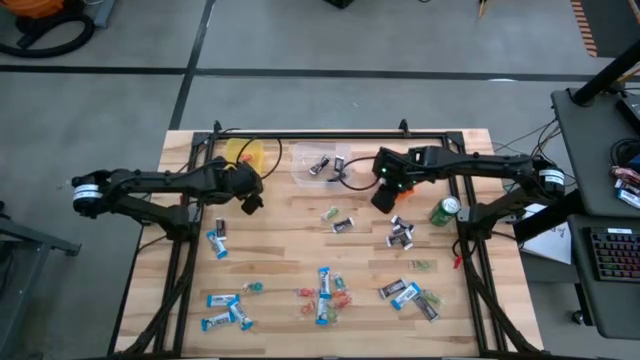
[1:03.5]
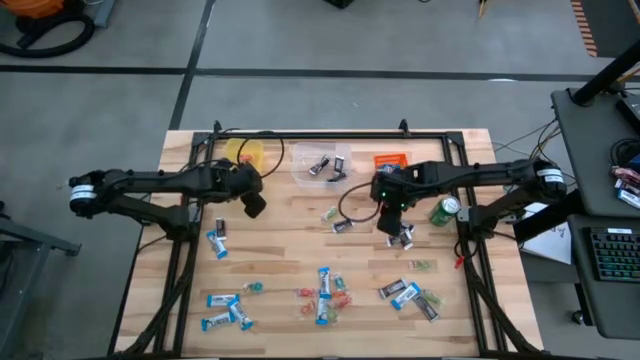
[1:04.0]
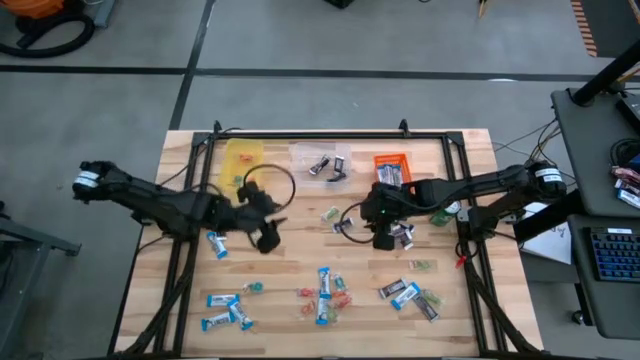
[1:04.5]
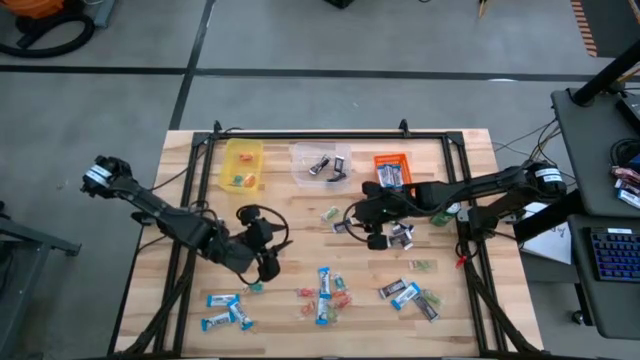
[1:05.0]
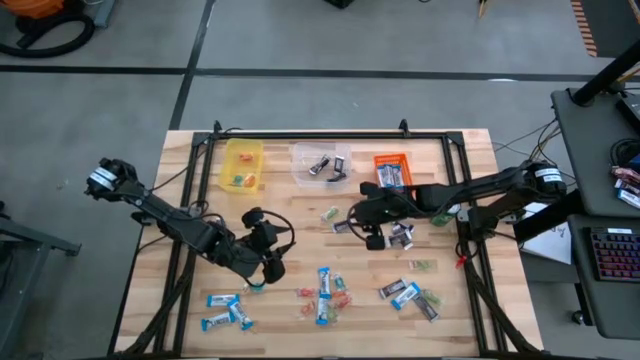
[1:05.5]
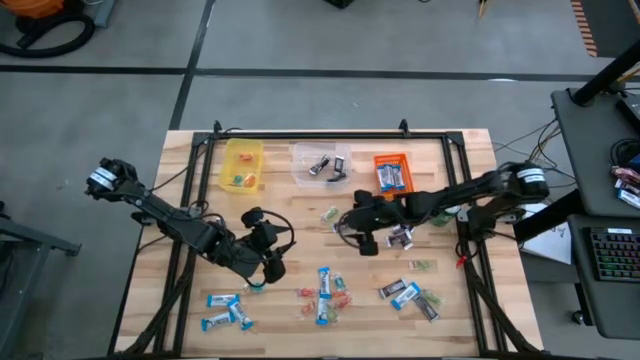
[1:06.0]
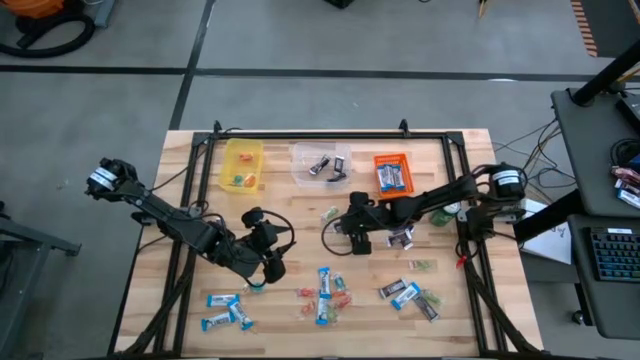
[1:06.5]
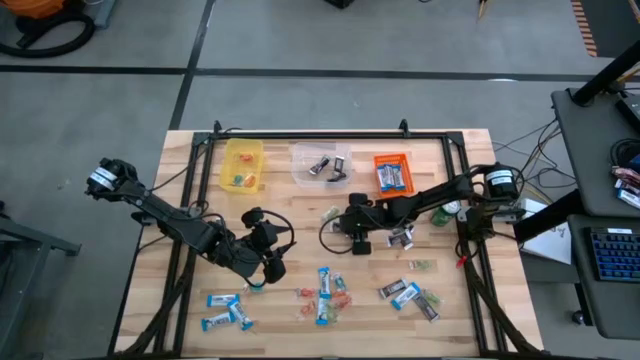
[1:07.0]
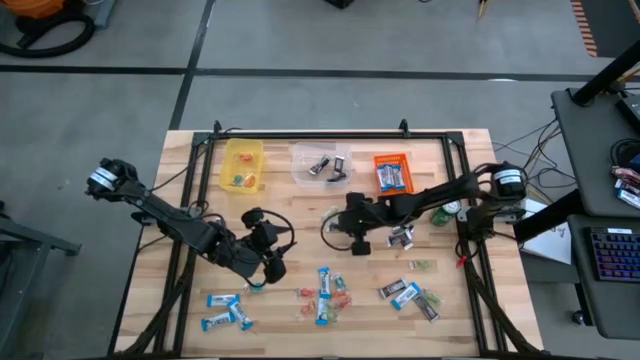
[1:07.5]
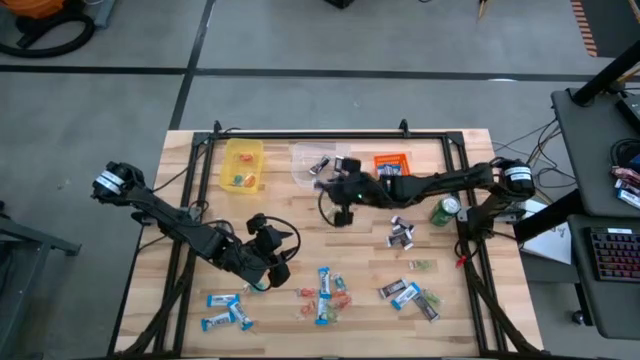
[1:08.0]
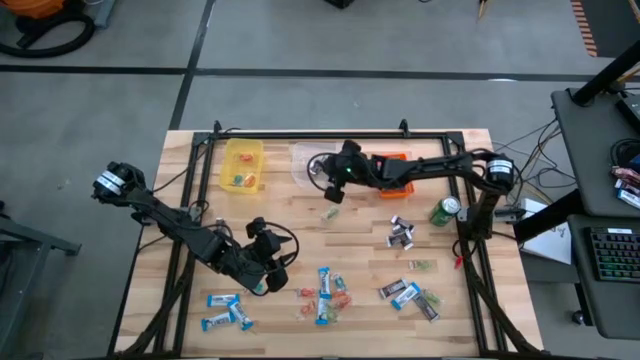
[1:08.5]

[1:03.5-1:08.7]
Task: Organize candy in baskets
Put the brown chocolate bar into the transparent bin

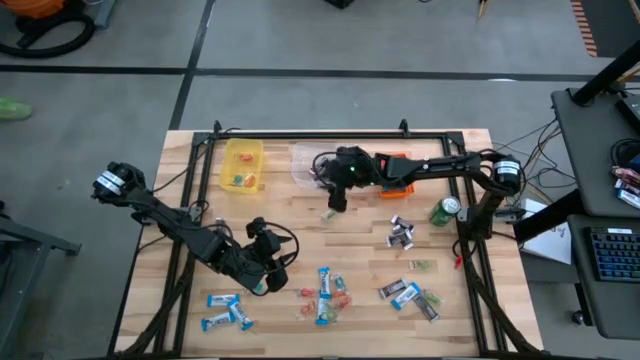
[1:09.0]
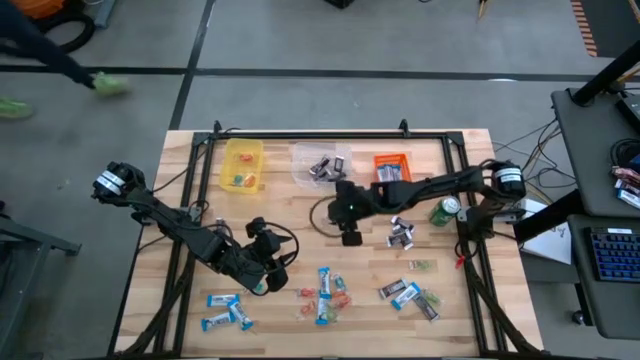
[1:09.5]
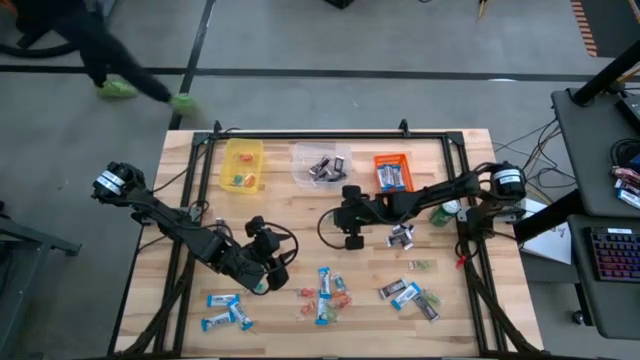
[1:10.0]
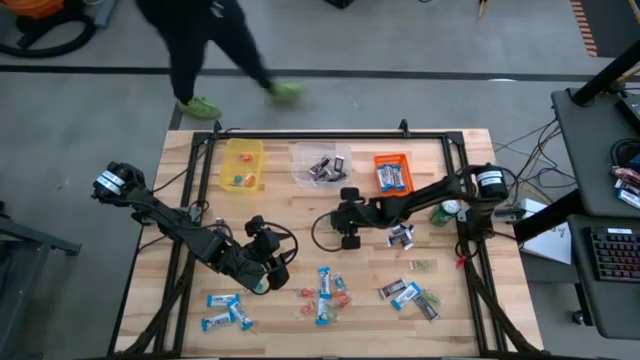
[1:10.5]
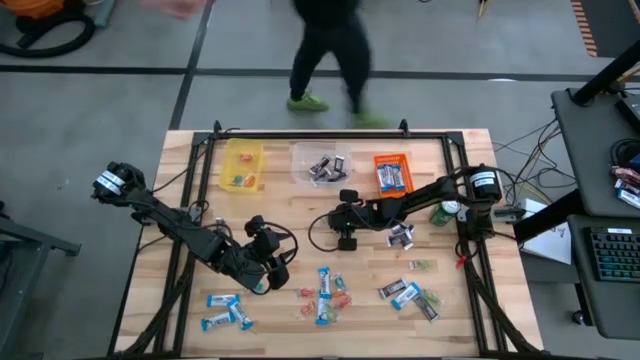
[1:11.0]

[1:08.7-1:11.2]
Put the green gummy into the yellow bin

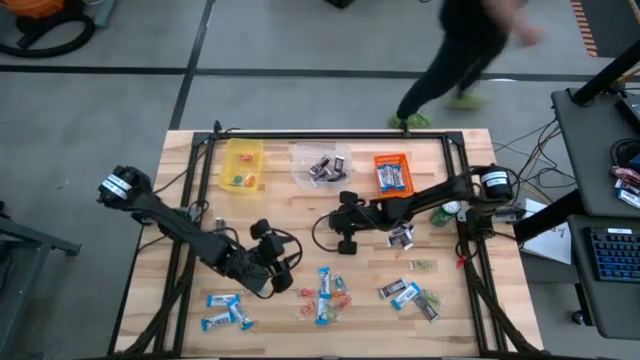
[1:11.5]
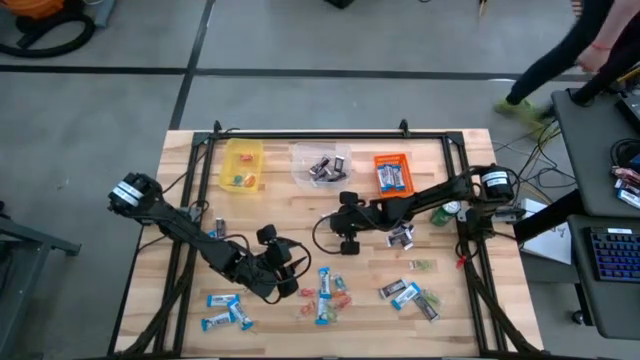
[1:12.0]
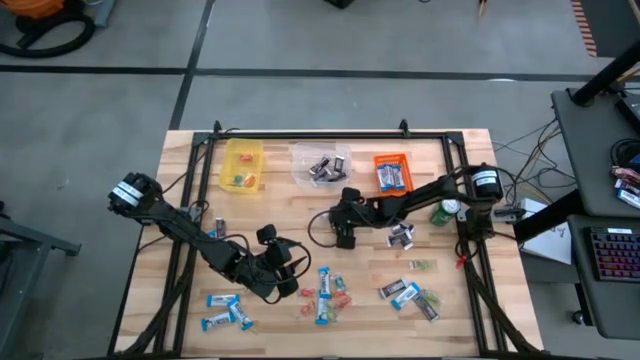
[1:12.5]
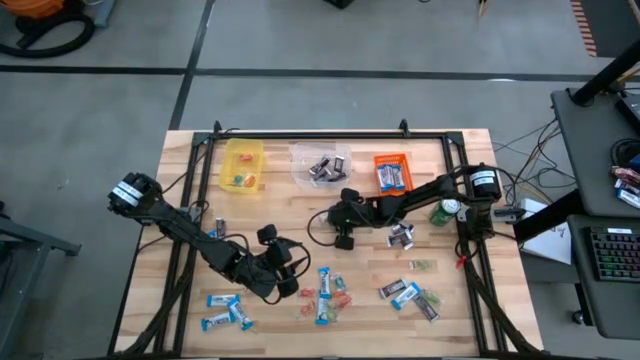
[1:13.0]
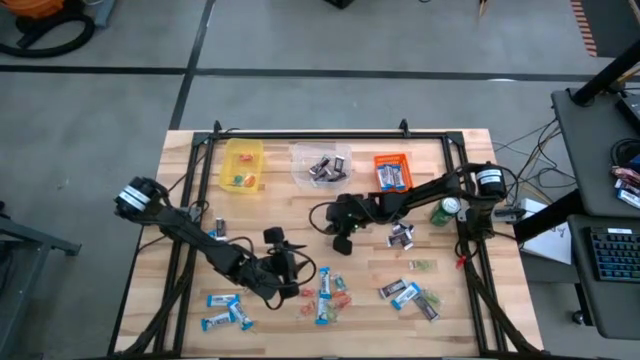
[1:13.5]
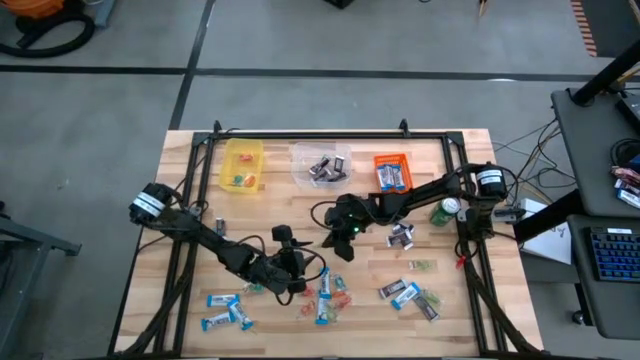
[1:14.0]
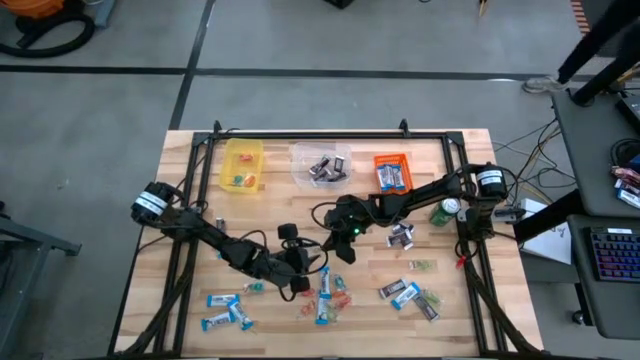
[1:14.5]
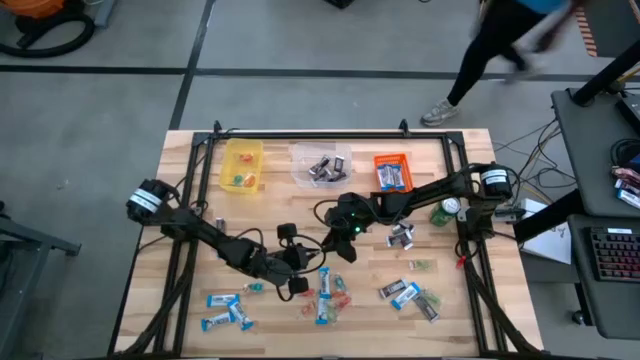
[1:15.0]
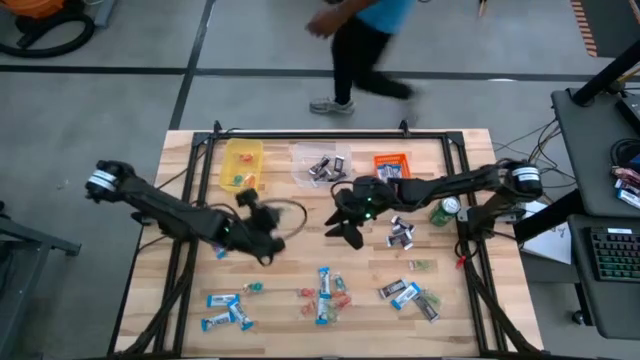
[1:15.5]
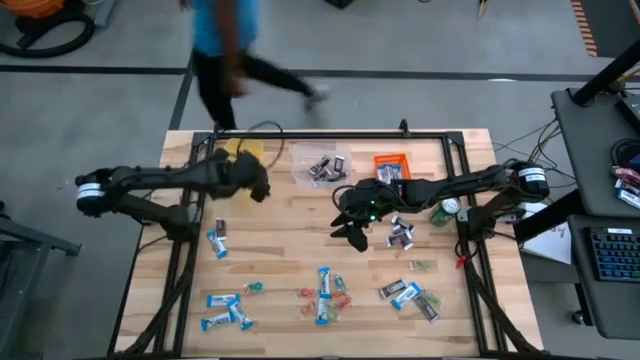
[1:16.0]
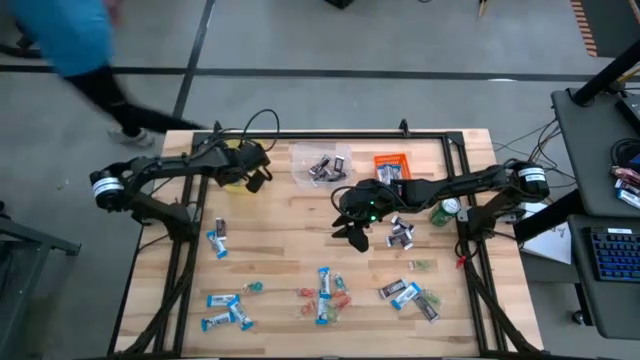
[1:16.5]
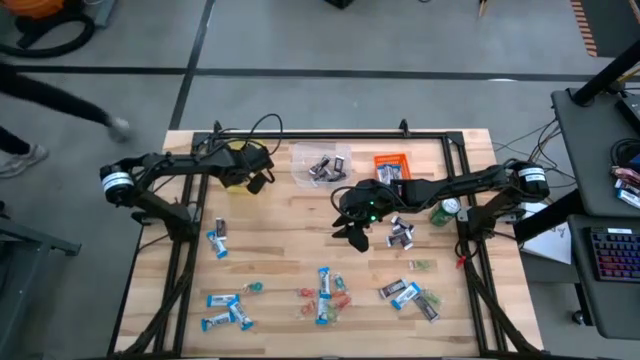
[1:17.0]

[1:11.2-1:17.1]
Put the green gummy into the yellow bin

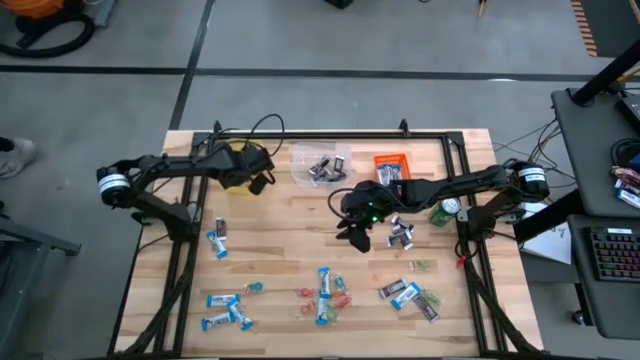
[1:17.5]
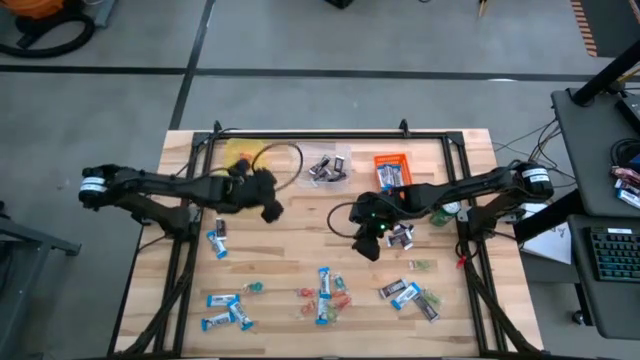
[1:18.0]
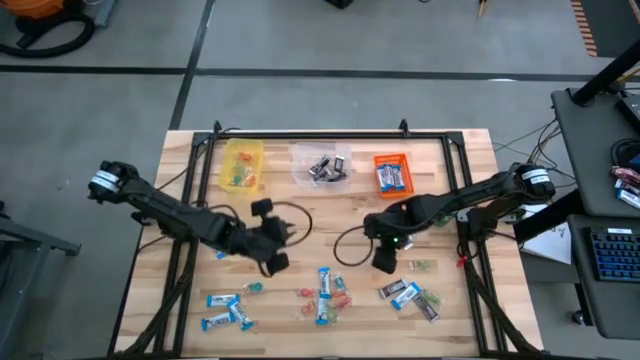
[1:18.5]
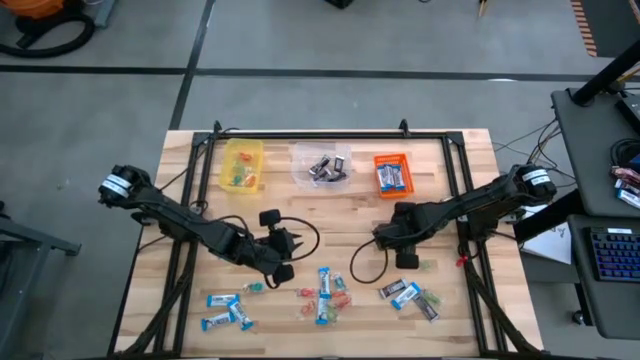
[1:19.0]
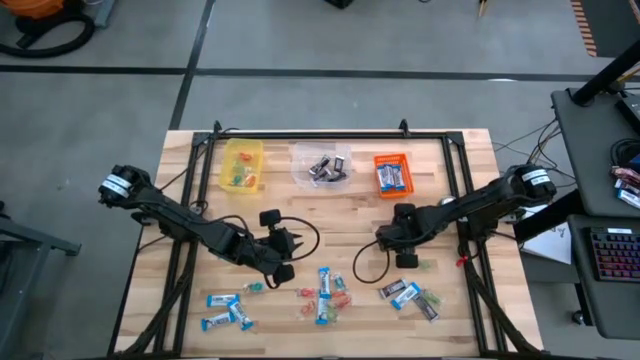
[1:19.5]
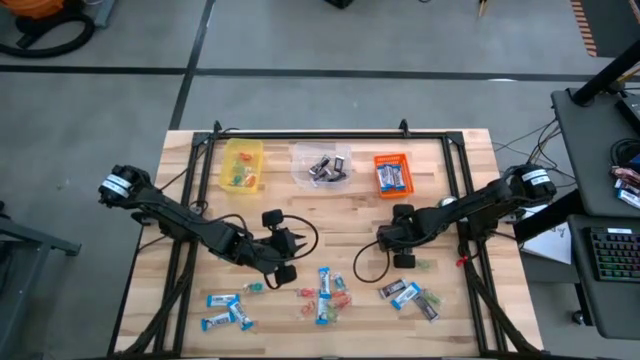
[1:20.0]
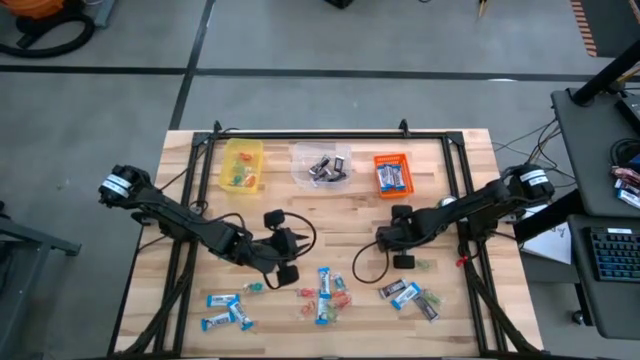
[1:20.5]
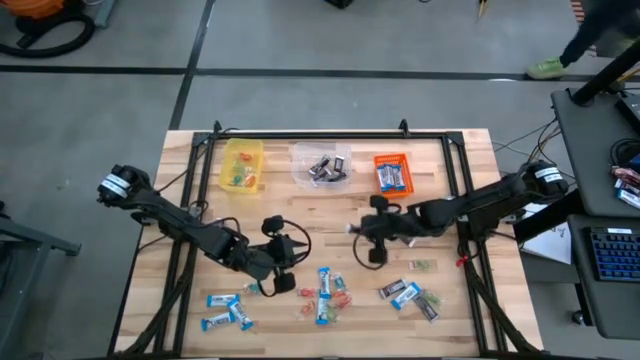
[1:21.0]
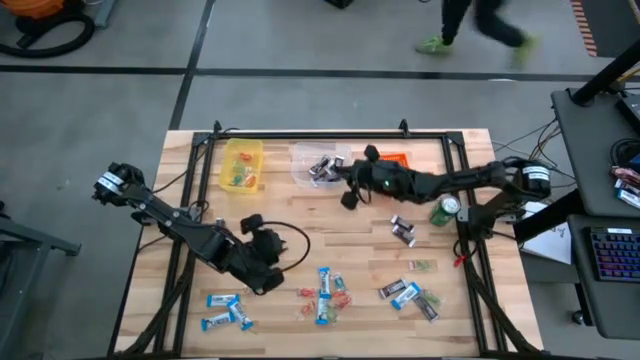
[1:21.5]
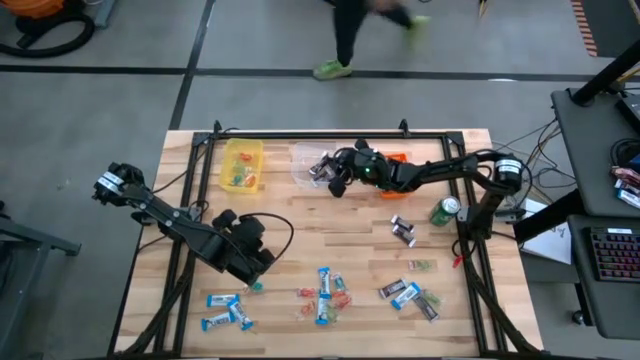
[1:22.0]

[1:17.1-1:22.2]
Put the brown chocolate bar into the transparent bin

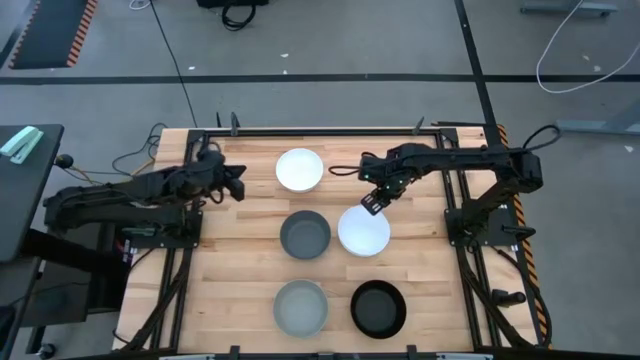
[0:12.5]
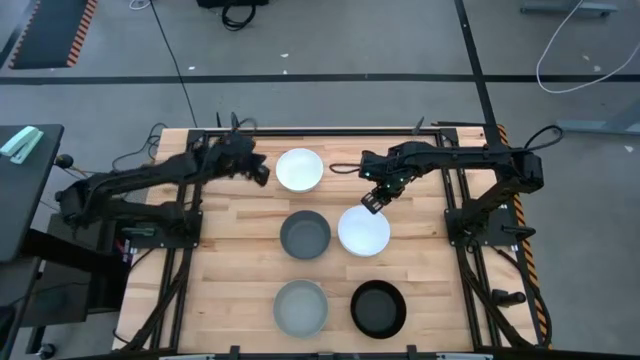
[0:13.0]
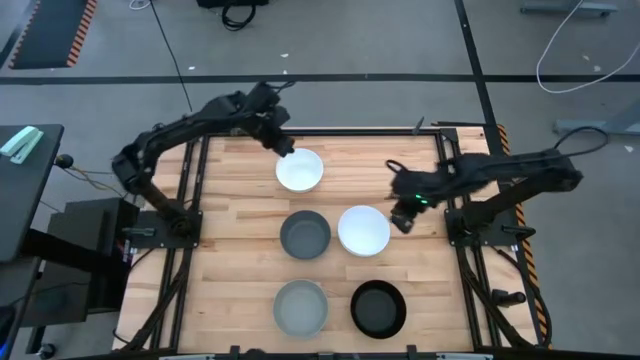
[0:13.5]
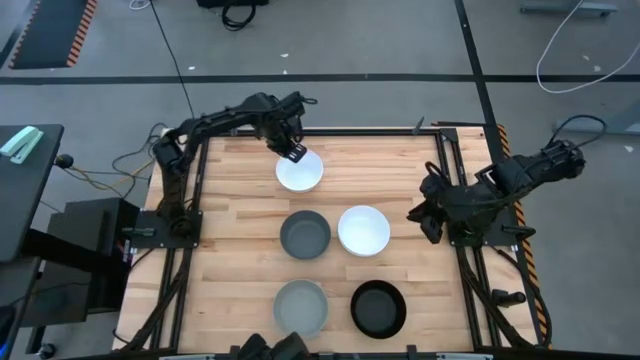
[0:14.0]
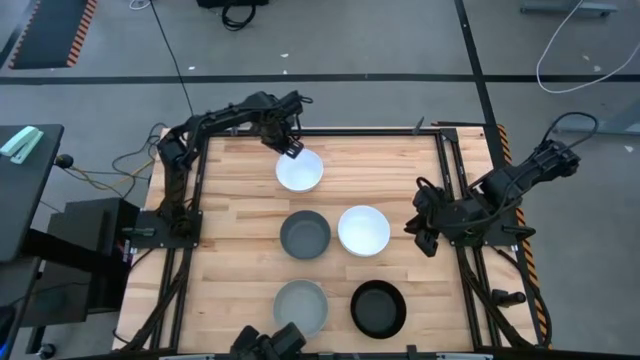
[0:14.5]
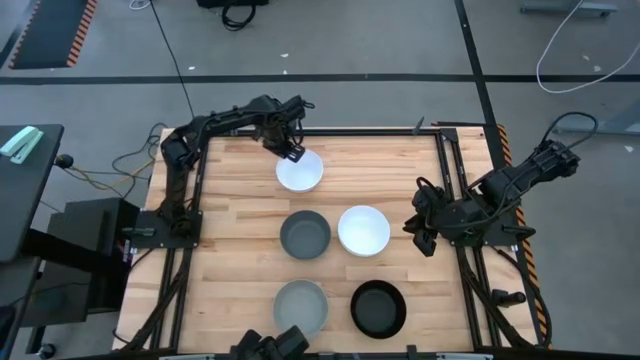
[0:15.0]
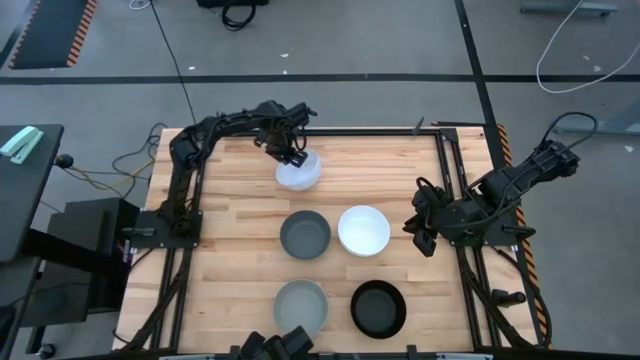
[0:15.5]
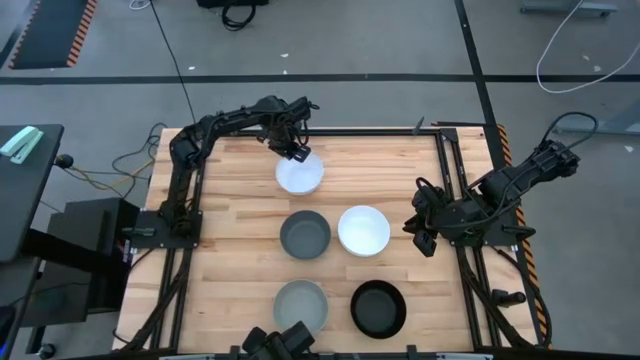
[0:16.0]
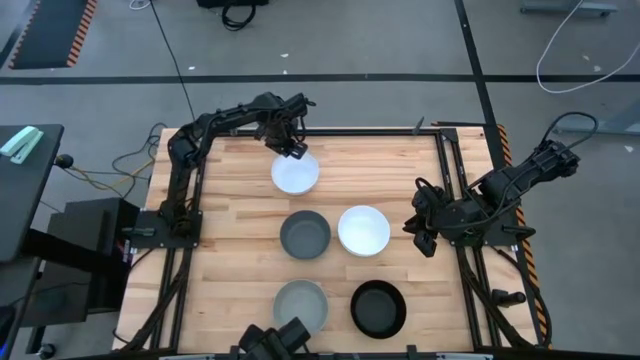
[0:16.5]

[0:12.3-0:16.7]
Task: Nest bowls inside each other
Stack the left white bowl on the dark gray bowl
